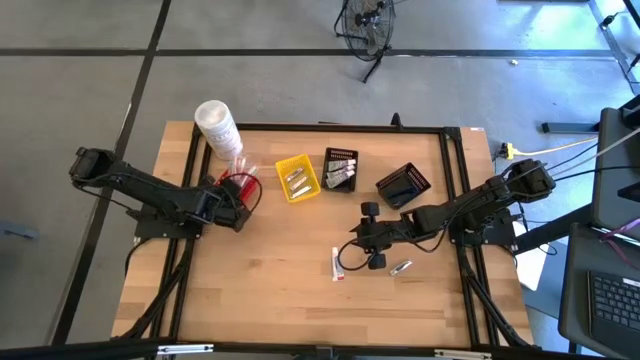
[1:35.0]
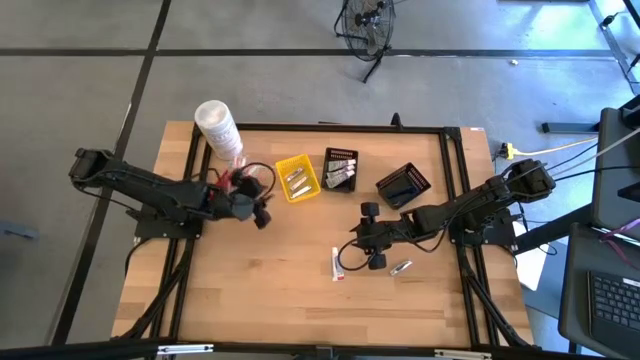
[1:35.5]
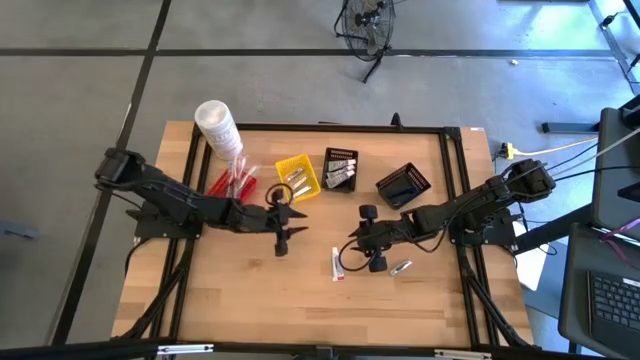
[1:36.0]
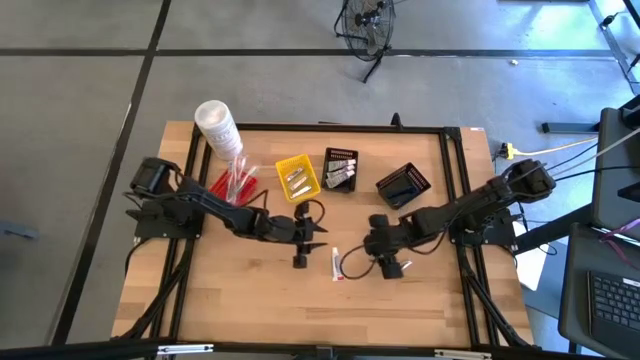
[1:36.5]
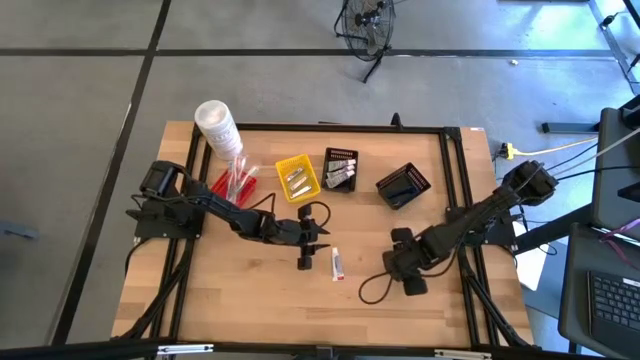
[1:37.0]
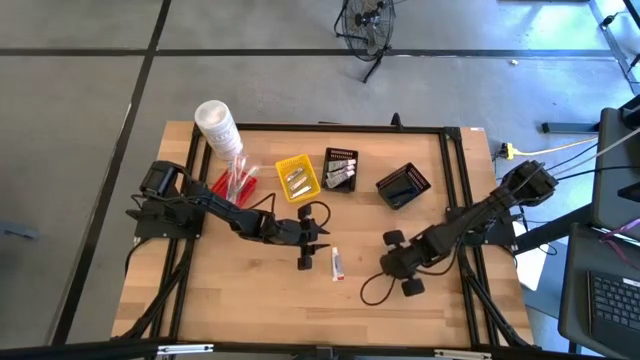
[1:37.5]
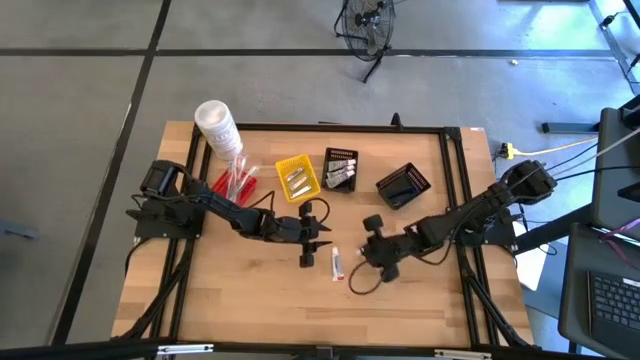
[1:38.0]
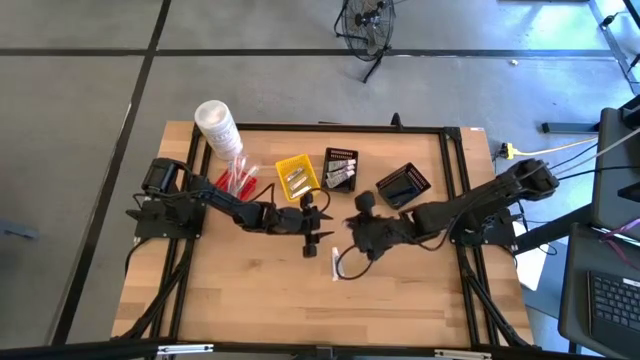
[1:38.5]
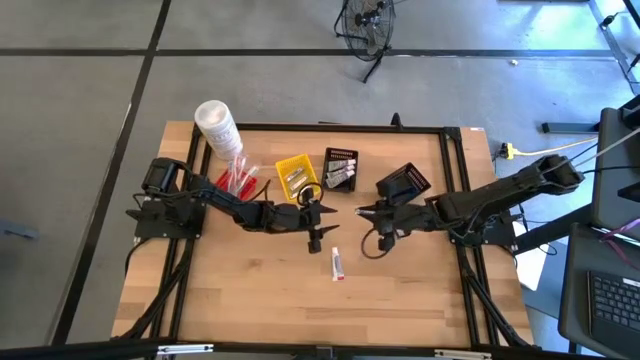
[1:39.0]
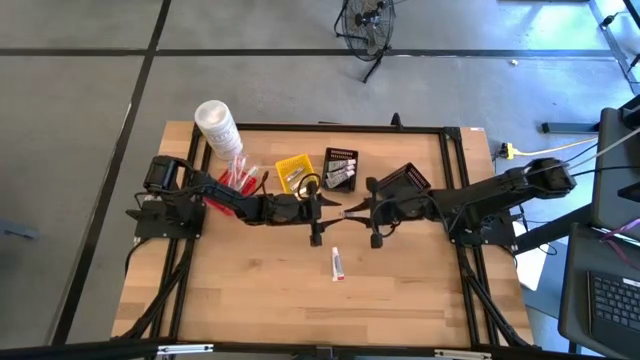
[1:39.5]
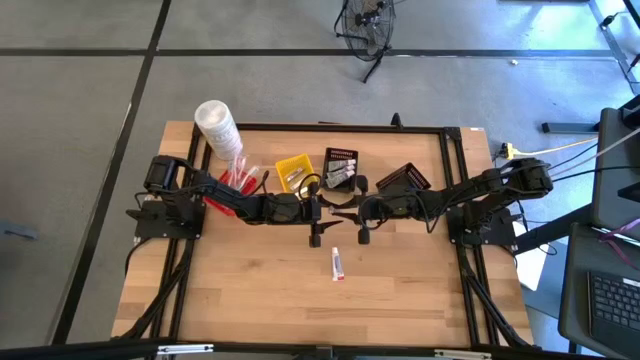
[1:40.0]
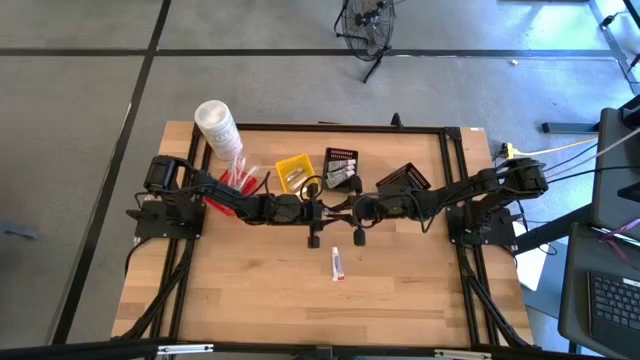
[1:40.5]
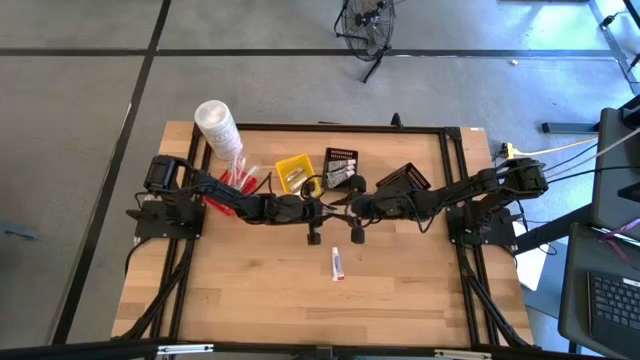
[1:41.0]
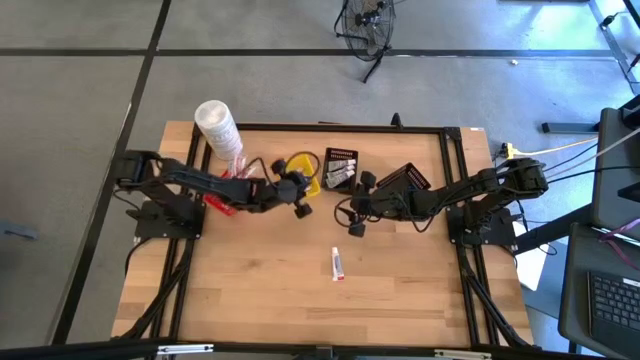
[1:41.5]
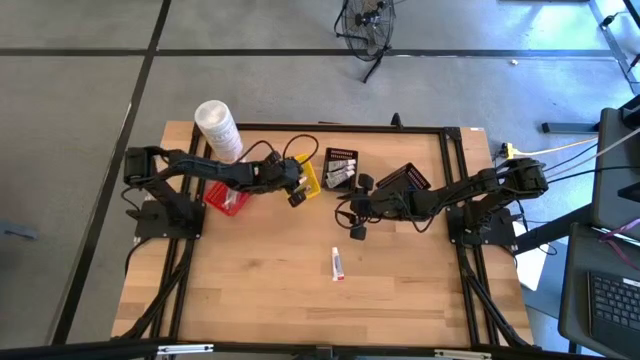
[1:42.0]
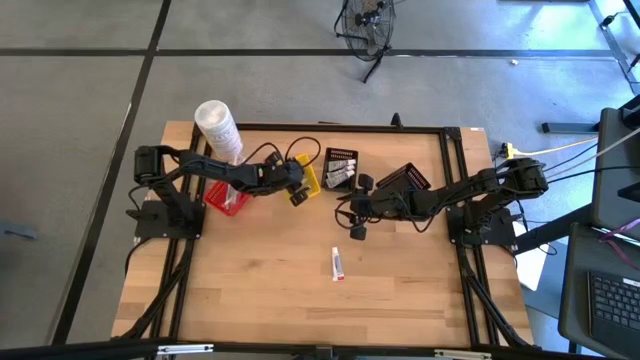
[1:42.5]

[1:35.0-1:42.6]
Task: Pick & Place Travel size toiletries
Put the nail cutter into the yellow bin

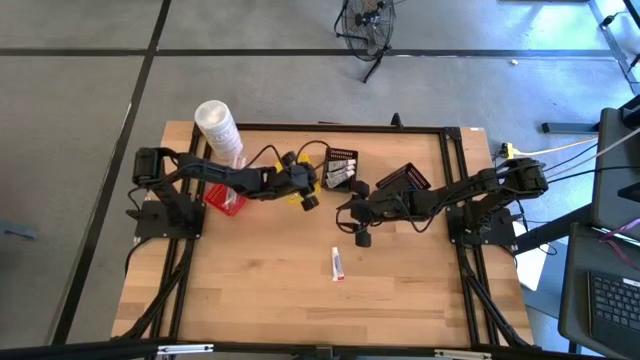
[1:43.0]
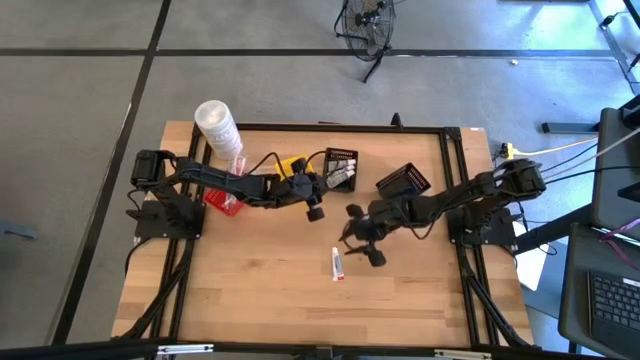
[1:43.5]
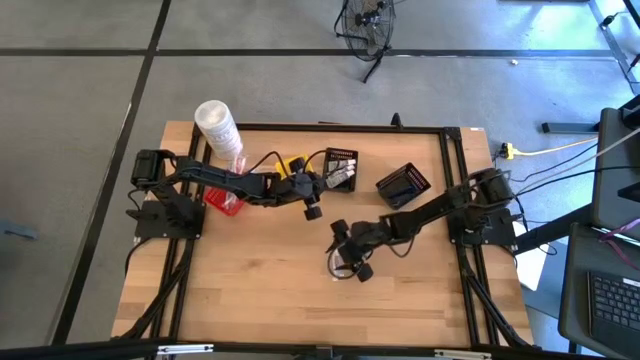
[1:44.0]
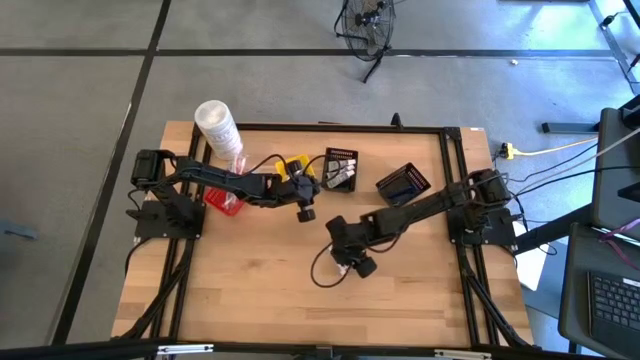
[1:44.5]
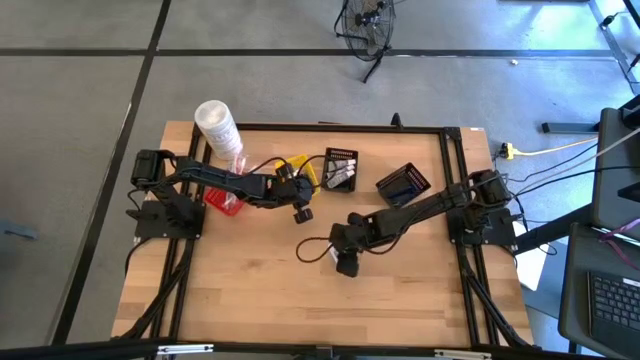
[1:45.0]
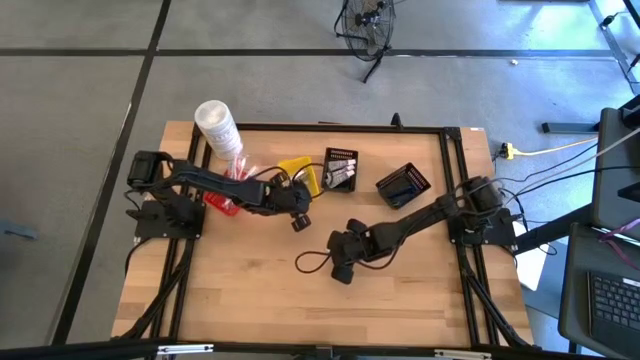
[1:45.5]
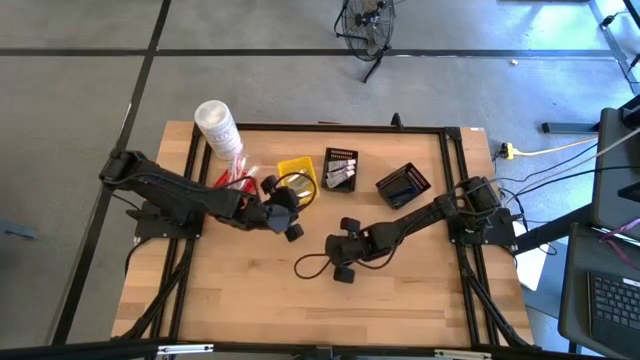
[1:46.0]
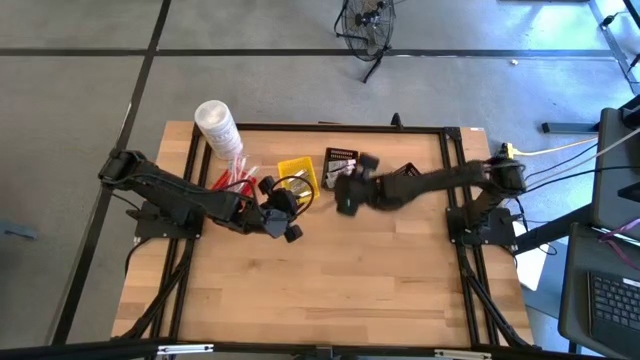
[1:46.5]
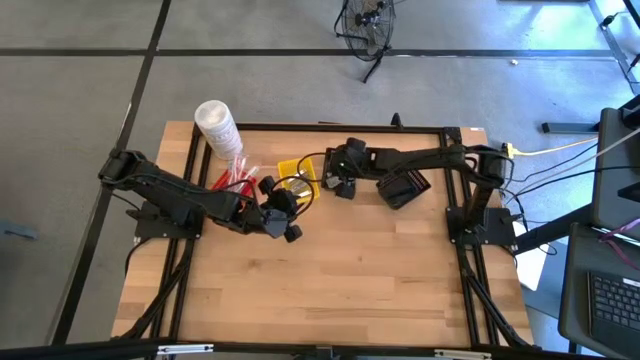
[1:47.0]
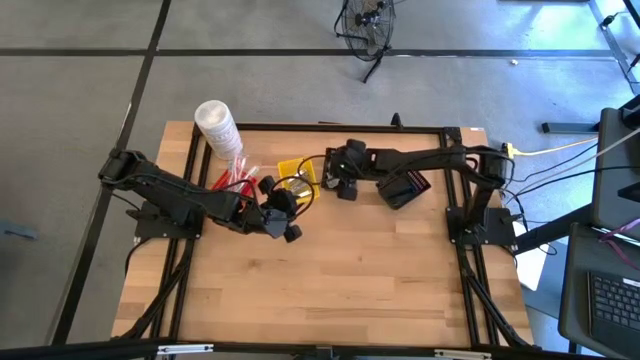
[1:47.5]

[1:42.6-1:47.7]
Put the toothpaste into the left black bin

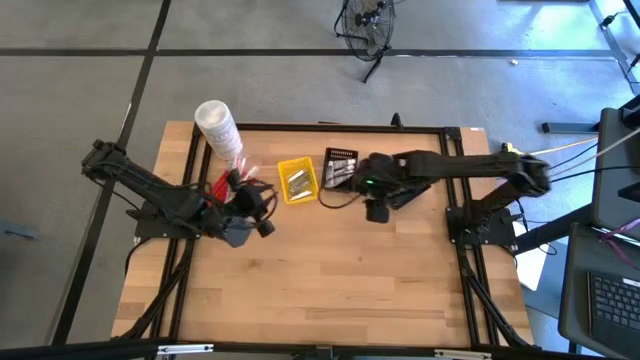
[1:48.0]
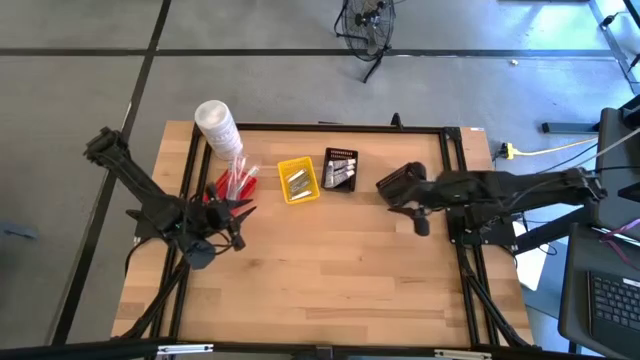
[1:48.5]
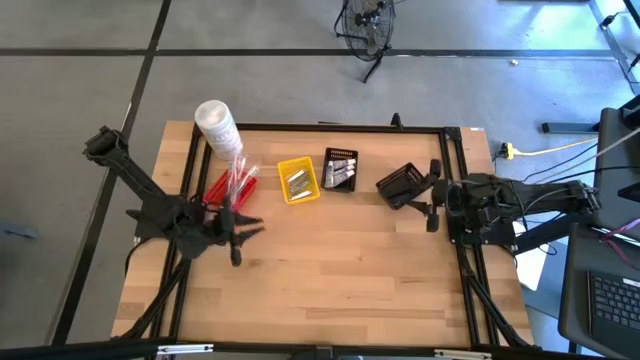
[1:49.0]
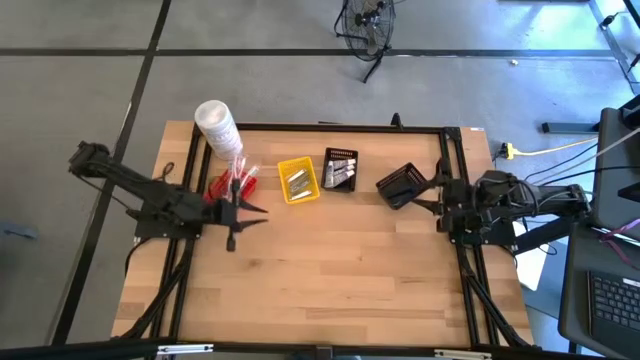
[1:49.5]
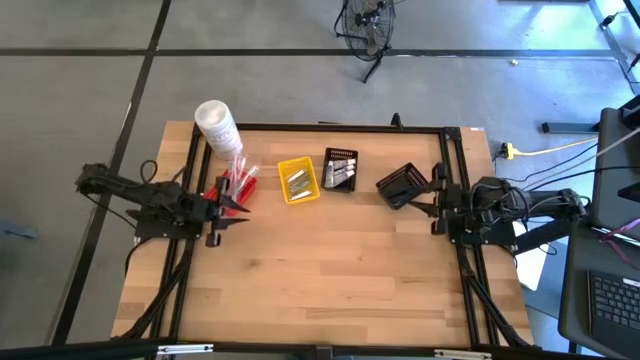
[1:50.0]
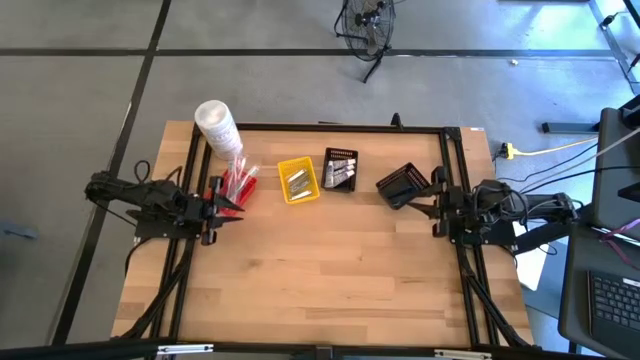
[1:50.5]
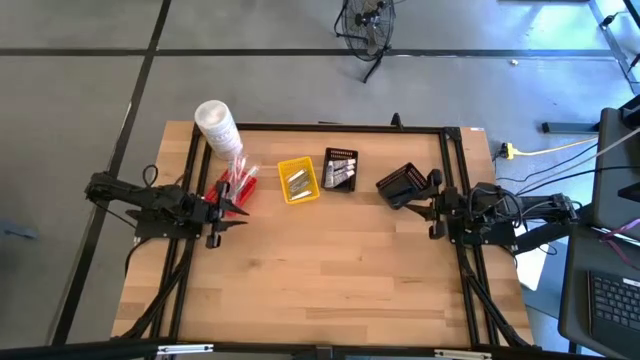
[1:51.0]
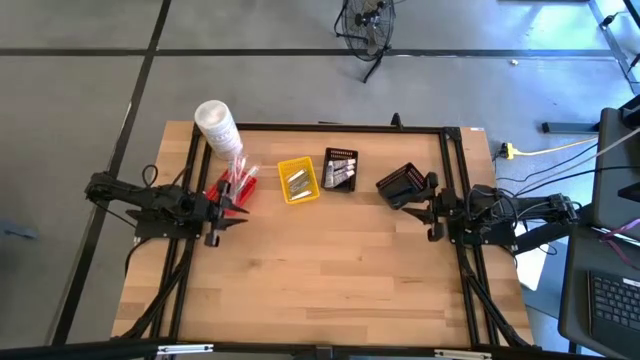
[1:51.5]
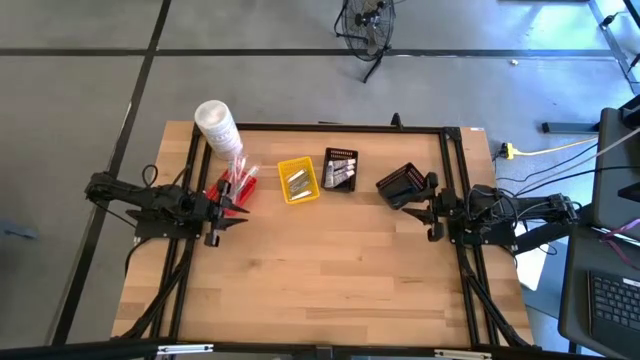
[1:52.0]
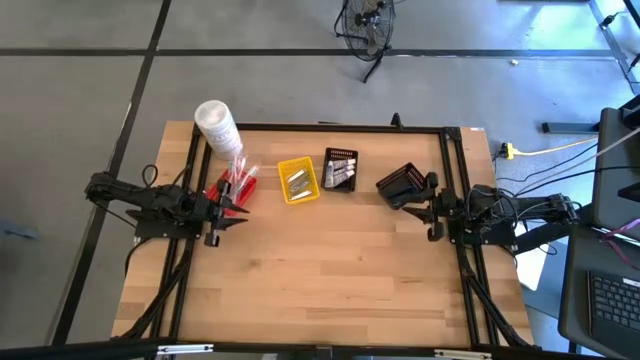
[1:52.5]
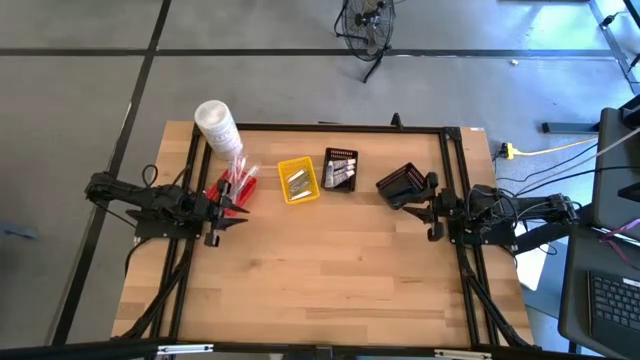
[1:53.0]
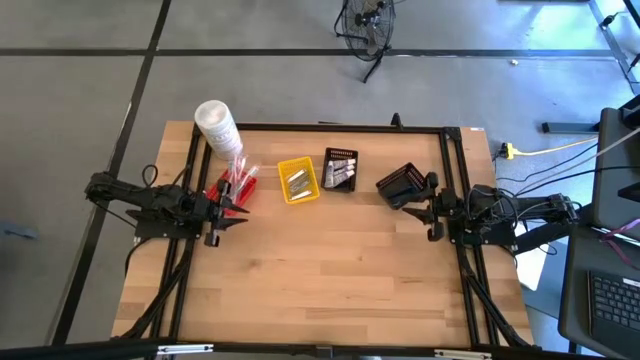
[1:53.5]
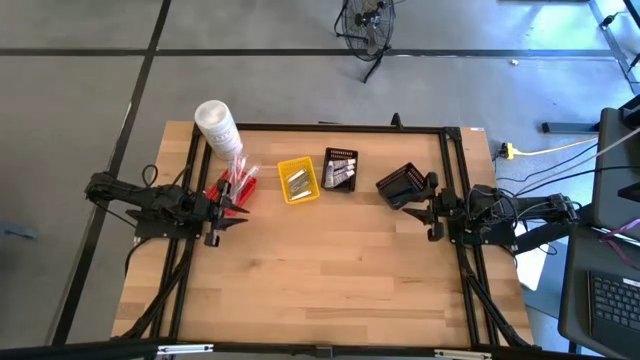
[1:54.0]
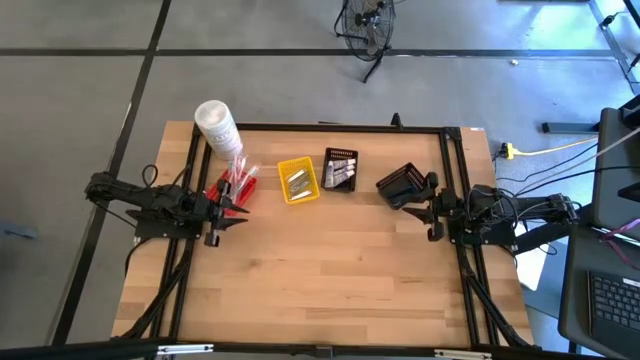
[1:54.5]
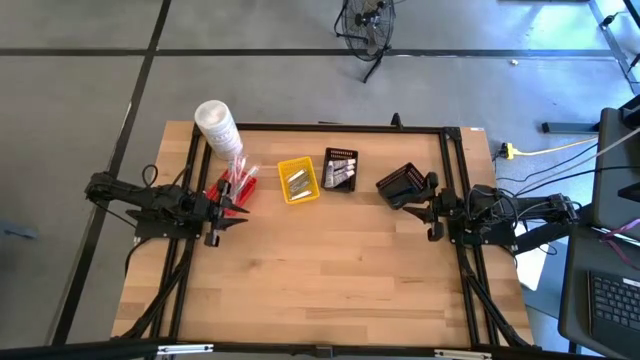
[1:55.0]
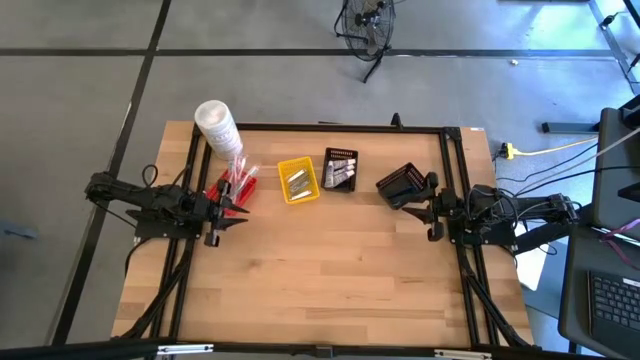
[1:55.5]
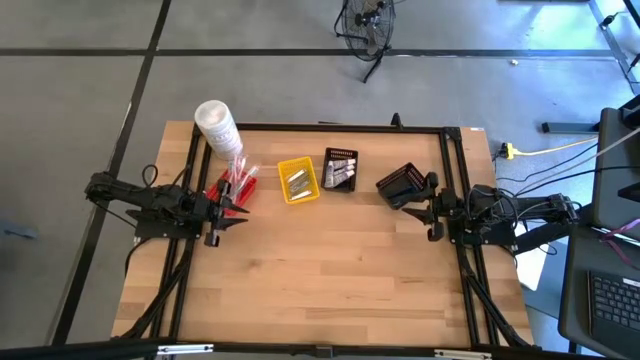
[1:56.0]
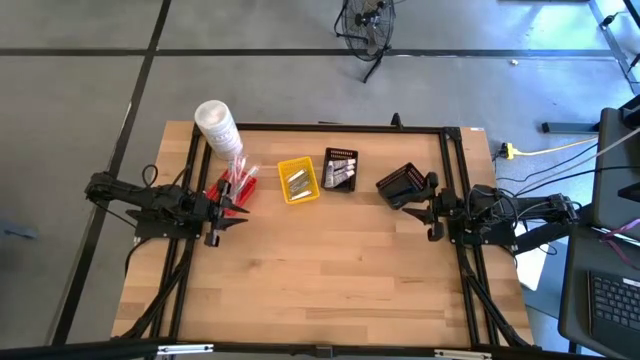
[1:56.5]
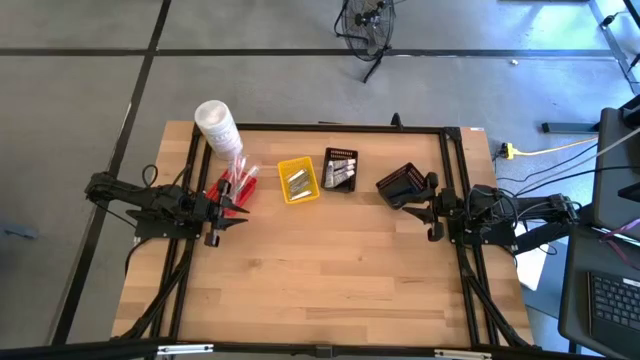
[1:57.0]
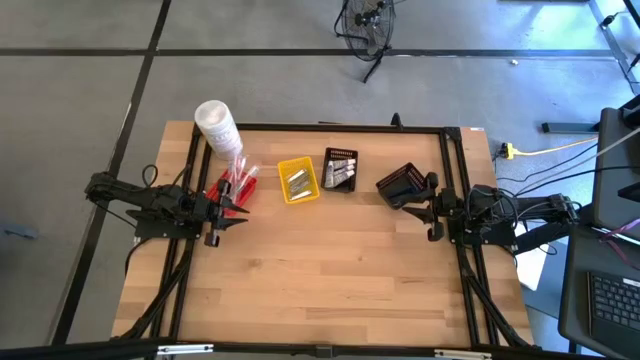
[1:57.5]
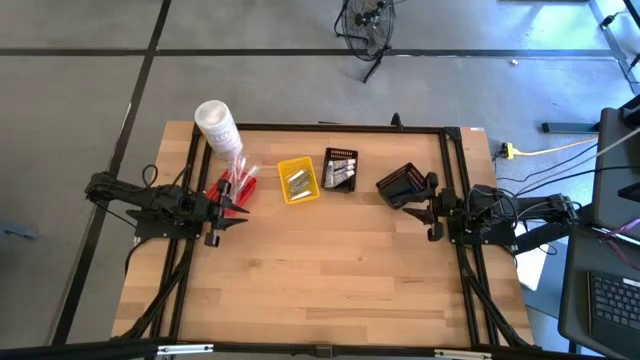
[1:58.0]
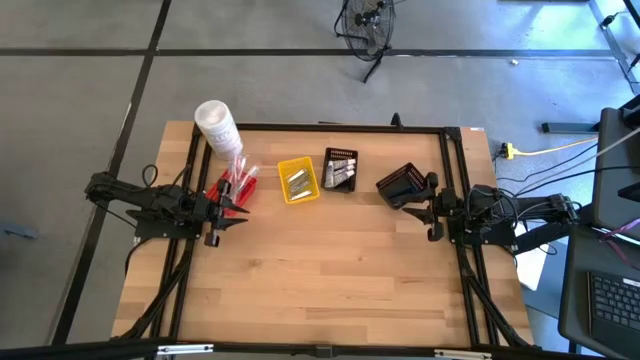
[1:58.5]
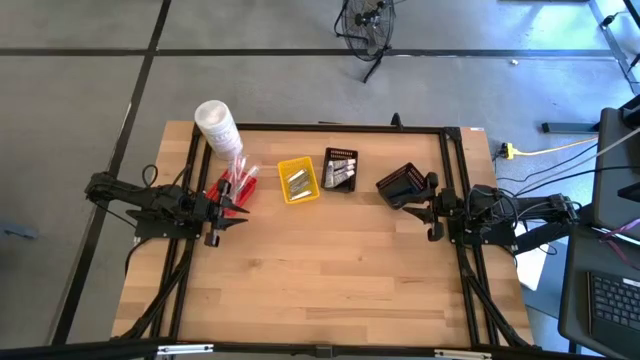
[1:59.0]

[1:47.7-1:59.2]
Return to Home Position
